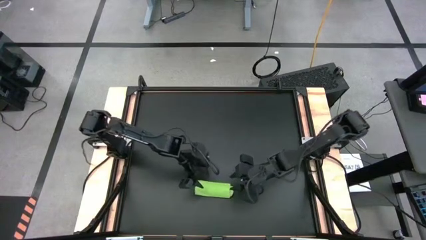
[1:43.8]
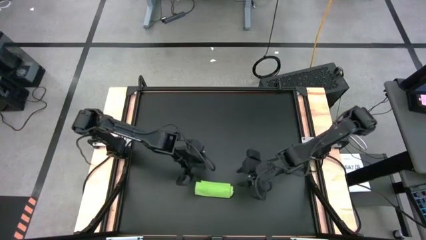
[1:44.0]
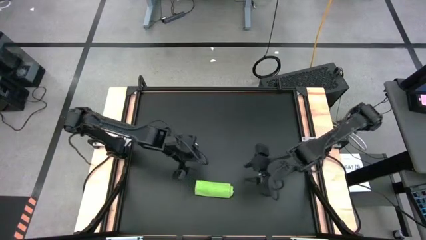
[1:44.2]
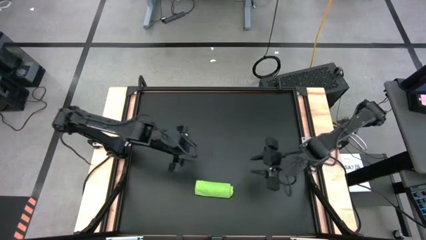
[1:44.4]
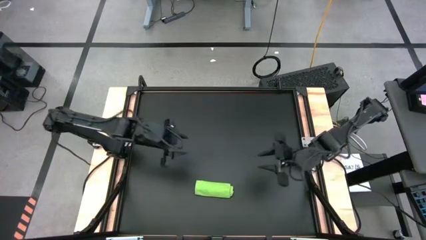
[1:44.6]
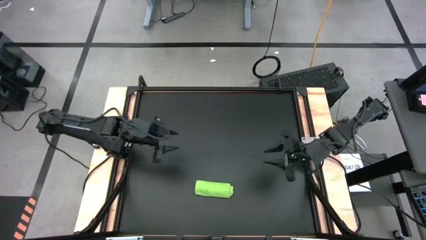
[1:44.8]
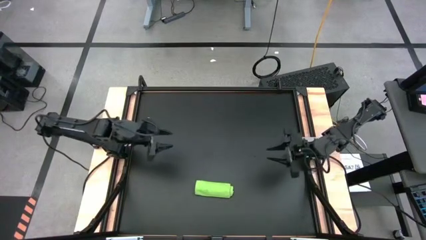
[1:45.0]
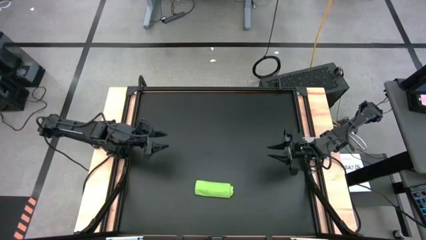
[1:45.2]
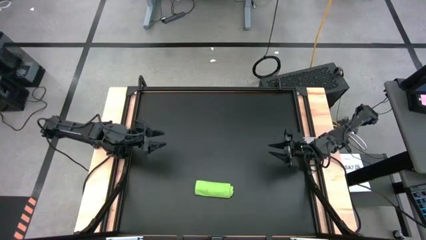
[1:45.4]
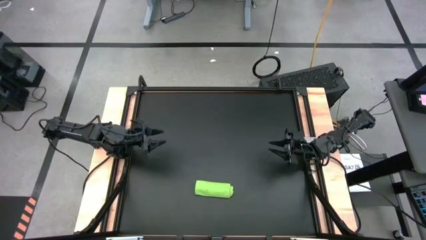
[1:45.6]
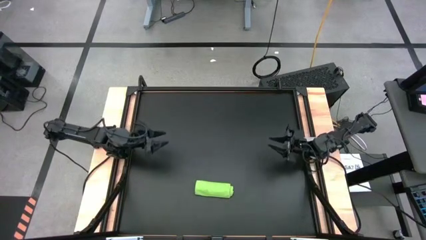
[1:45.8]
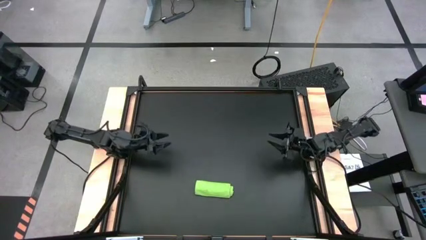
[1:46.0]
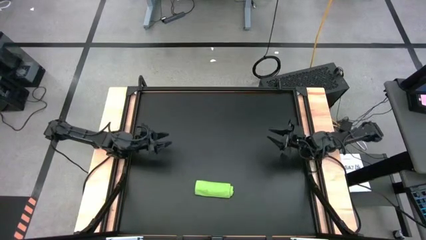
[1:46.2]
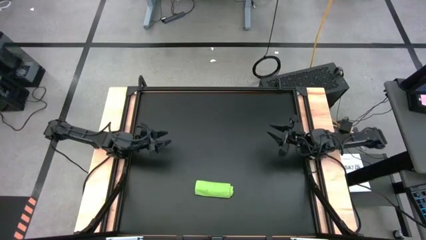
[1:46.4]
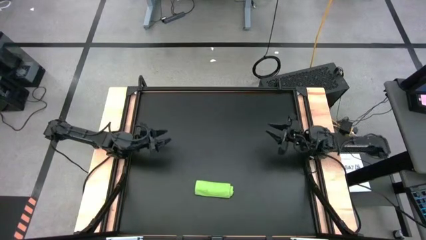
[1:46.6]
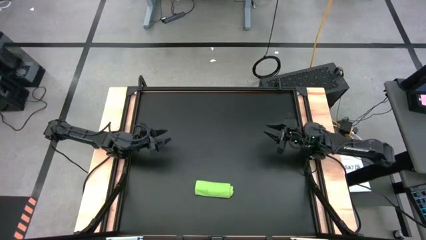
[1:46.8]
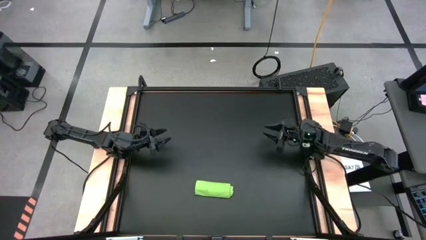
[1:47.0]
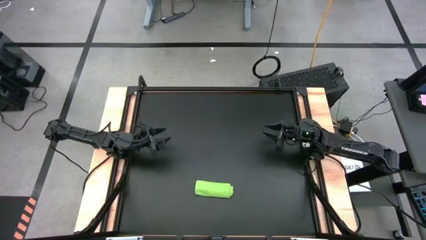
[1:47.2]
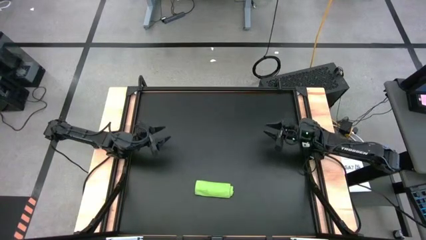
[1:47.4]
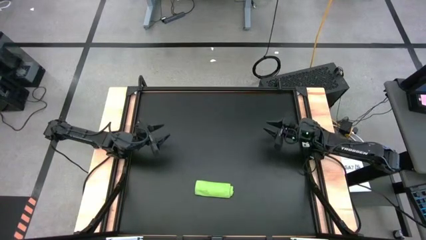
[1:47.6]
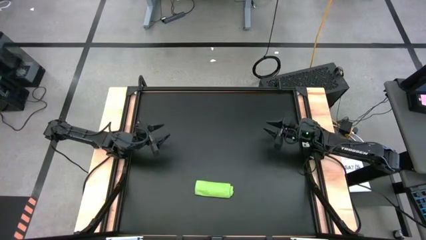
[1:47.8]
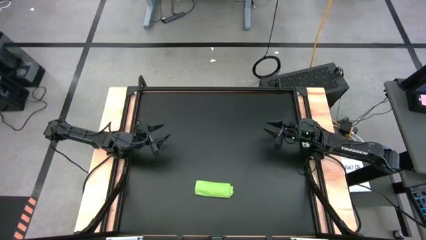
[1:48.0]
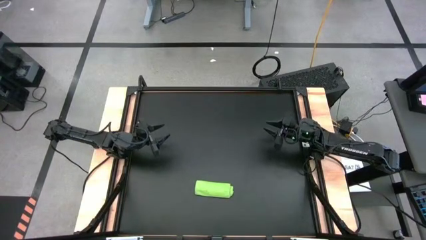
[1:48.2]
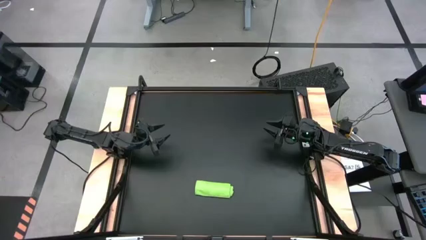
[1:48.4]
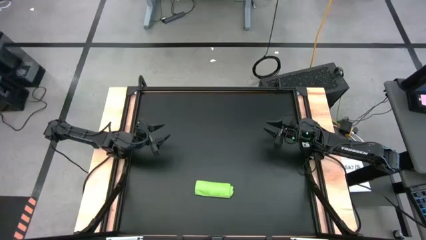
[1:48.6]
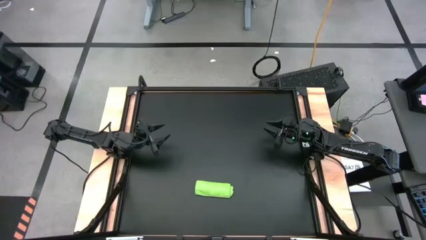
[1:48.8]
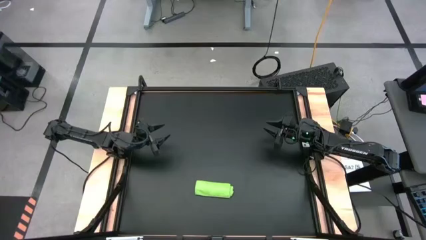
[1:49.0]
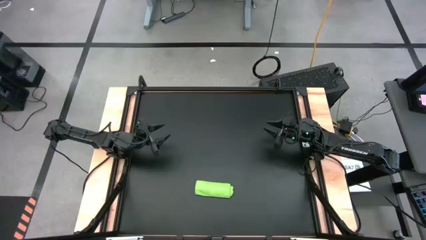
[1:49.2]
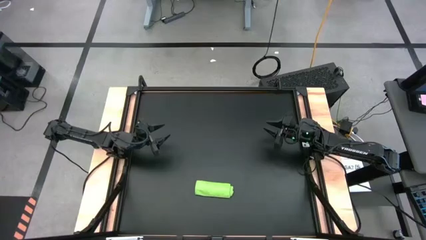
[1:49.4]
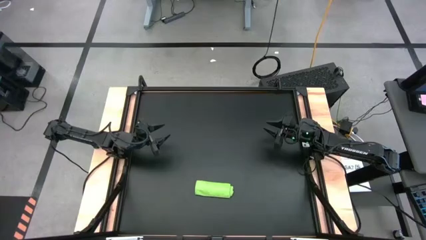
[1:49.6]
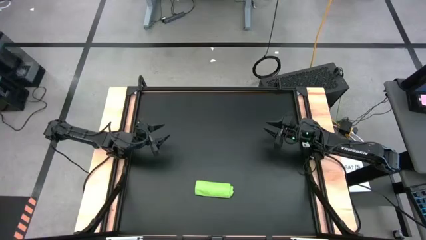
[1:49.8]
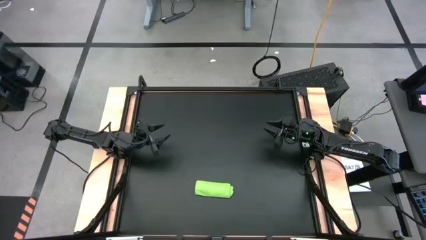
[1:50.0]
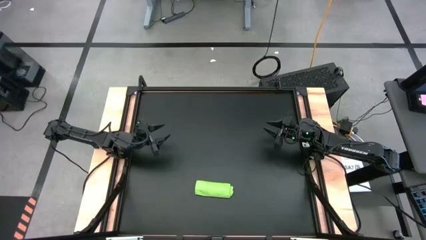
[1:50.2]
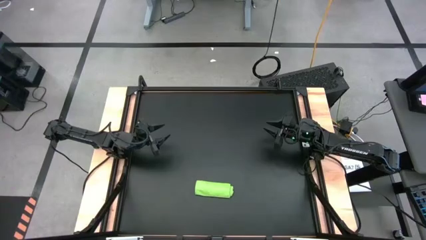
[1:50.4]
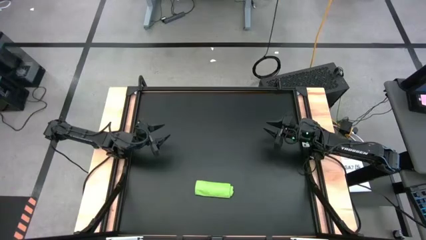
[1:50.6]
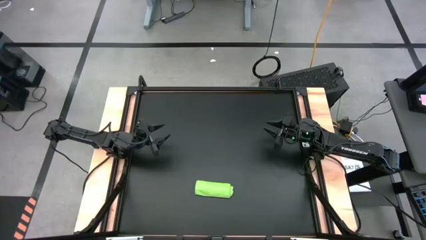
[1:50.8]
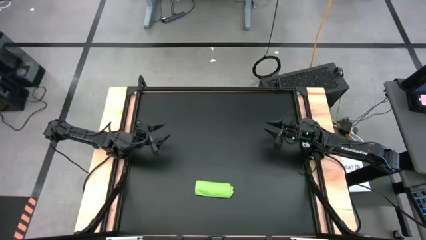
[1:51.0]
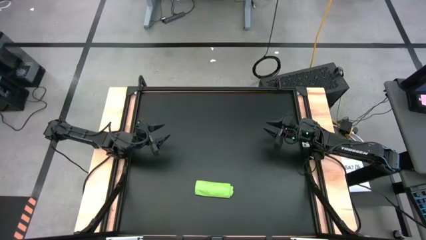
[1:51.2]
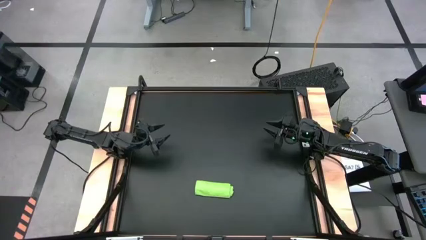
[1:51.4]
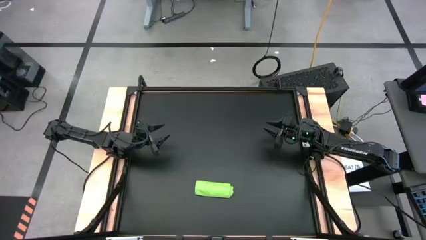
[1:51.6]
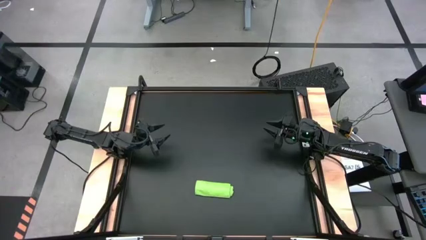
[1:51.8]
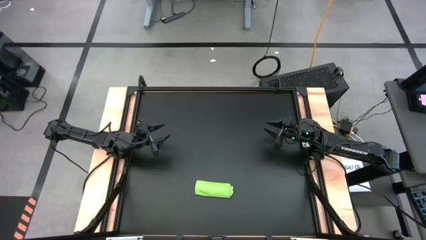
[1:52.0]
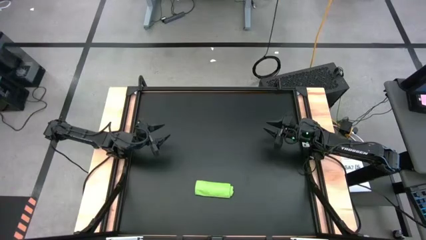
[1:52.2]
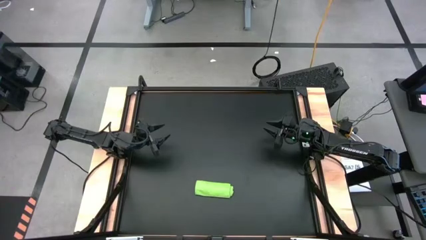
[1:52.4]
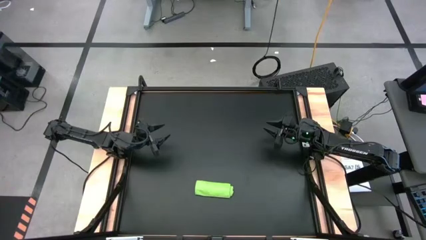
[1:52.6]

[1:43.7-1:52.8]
Task: Roll towel into tight, uniform cylinder
Return to Home Position

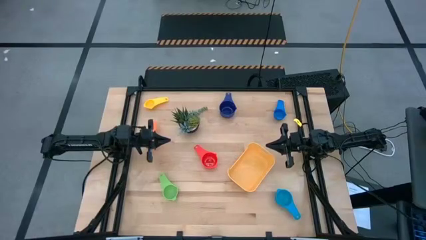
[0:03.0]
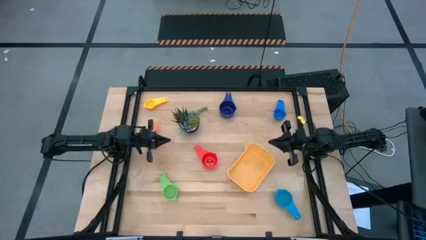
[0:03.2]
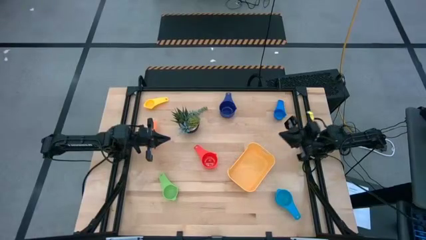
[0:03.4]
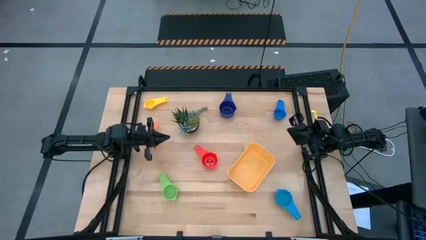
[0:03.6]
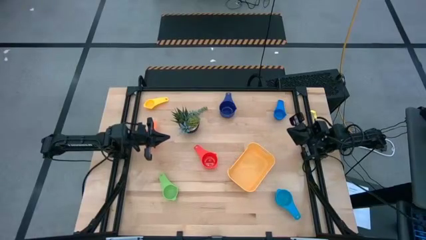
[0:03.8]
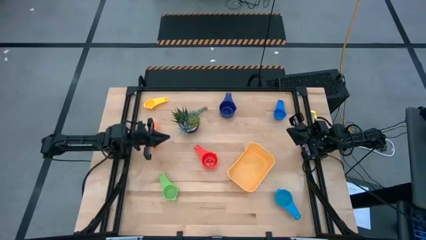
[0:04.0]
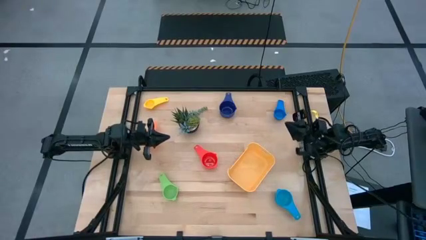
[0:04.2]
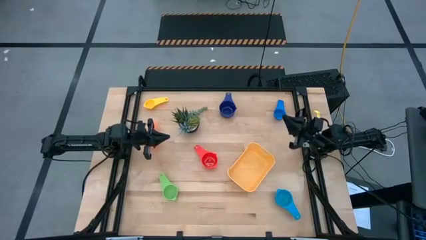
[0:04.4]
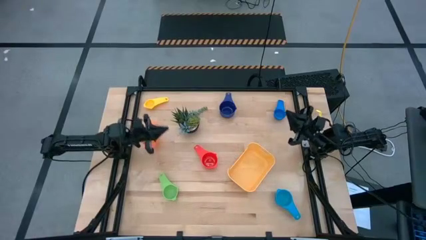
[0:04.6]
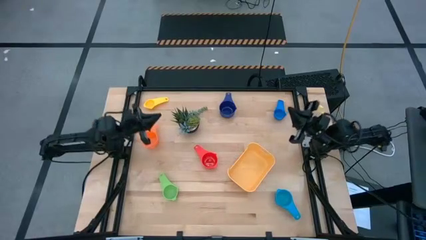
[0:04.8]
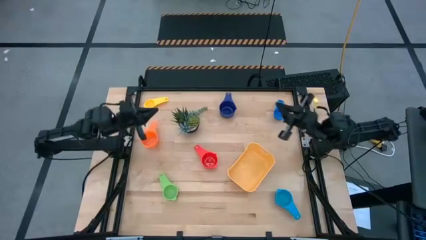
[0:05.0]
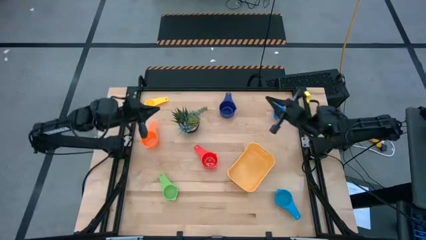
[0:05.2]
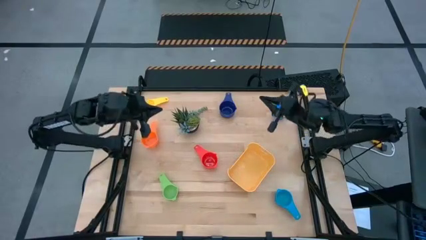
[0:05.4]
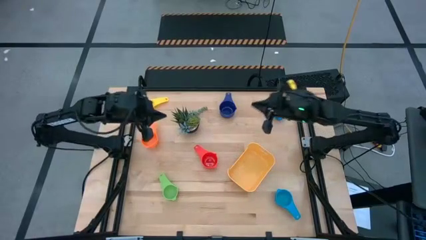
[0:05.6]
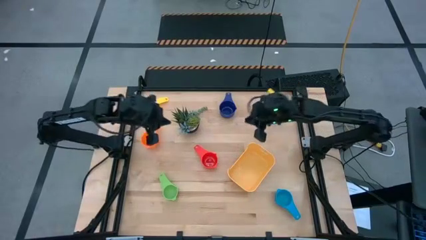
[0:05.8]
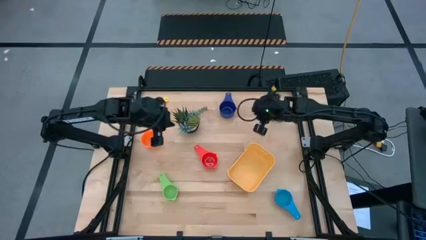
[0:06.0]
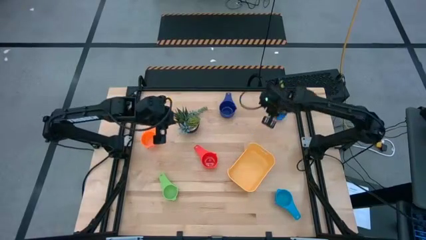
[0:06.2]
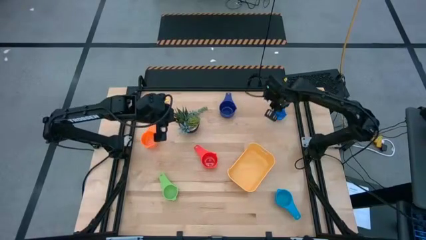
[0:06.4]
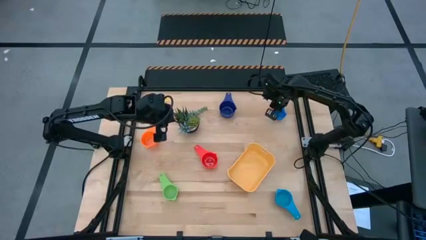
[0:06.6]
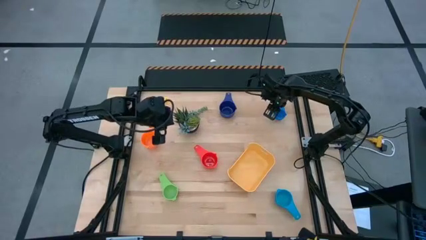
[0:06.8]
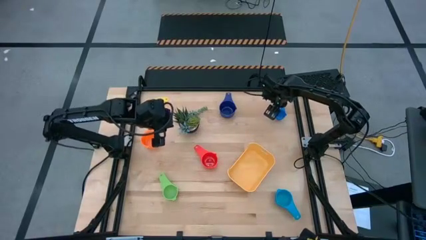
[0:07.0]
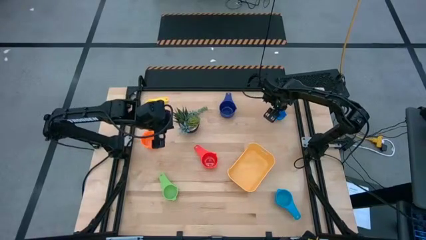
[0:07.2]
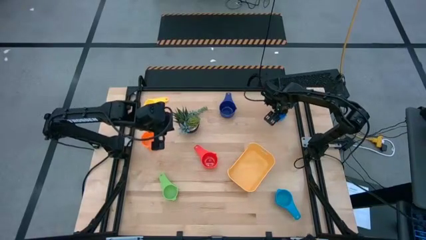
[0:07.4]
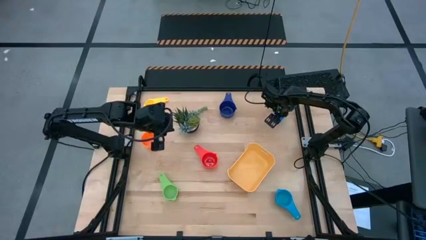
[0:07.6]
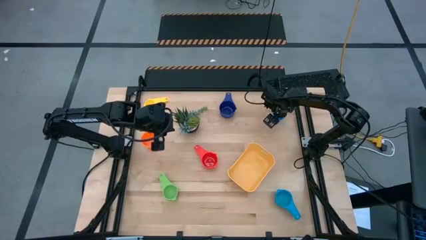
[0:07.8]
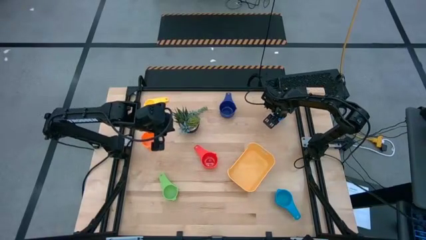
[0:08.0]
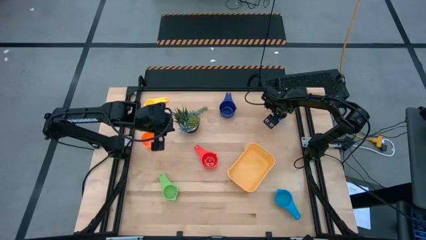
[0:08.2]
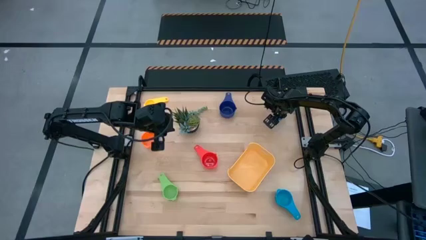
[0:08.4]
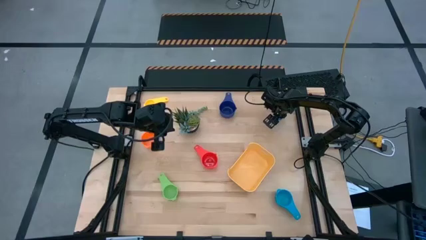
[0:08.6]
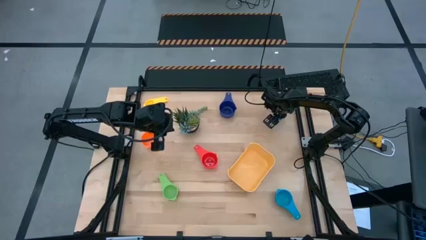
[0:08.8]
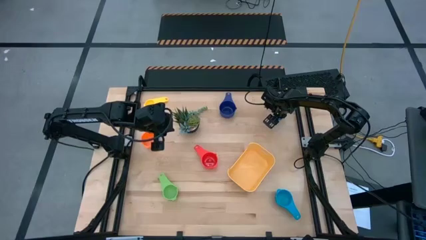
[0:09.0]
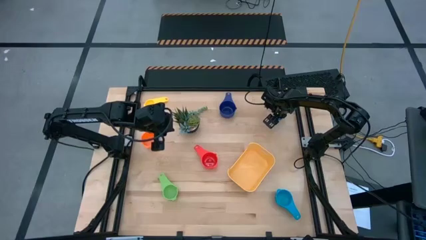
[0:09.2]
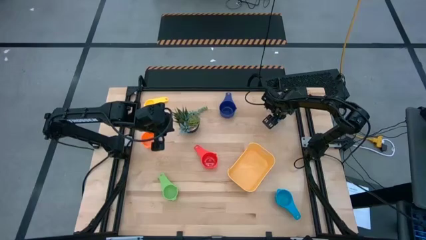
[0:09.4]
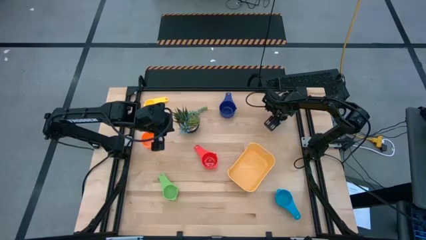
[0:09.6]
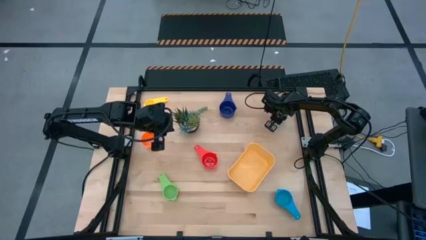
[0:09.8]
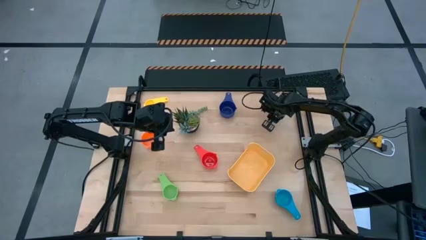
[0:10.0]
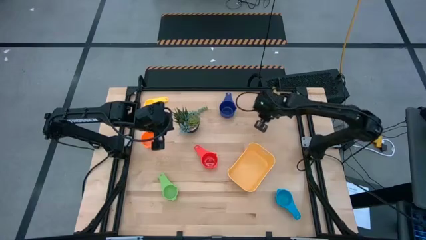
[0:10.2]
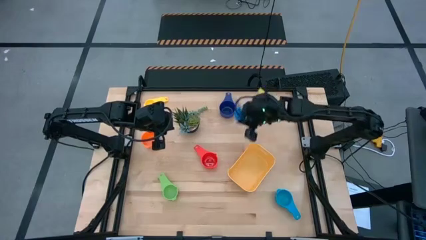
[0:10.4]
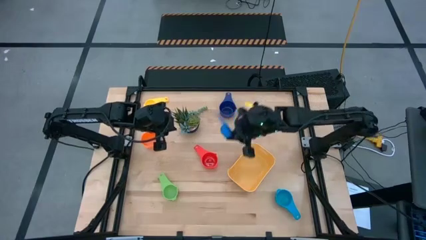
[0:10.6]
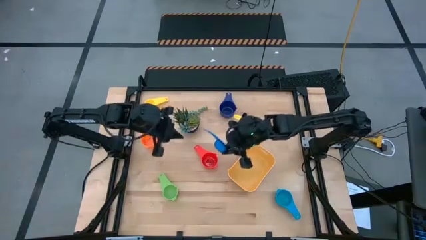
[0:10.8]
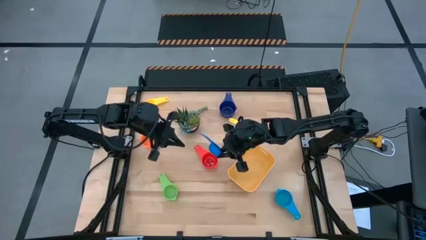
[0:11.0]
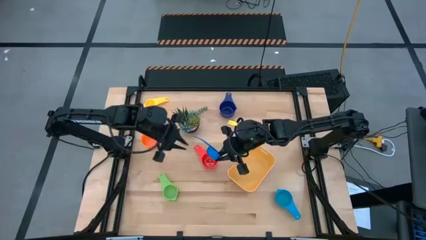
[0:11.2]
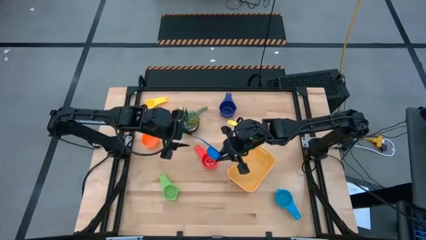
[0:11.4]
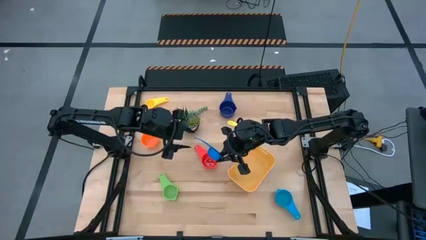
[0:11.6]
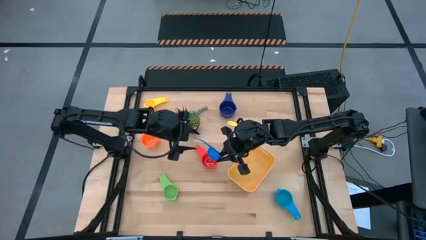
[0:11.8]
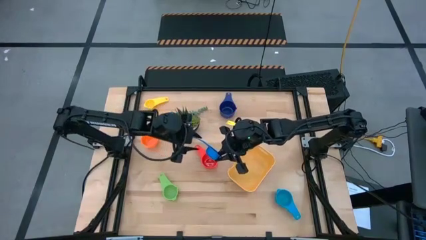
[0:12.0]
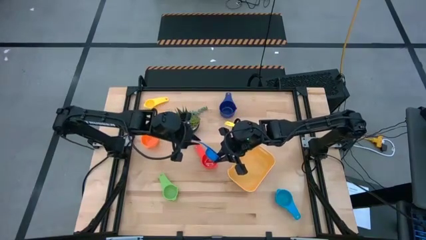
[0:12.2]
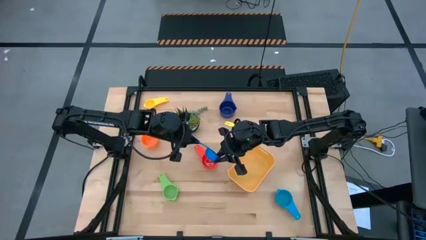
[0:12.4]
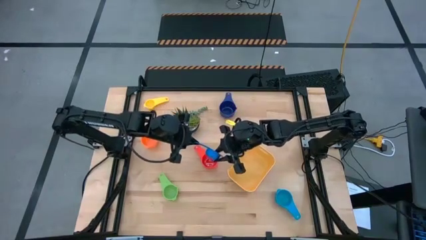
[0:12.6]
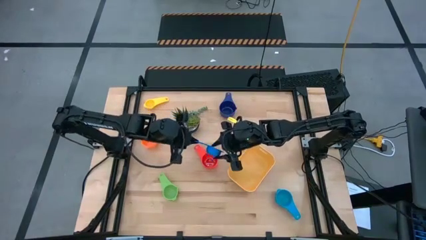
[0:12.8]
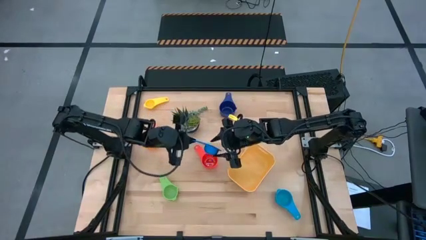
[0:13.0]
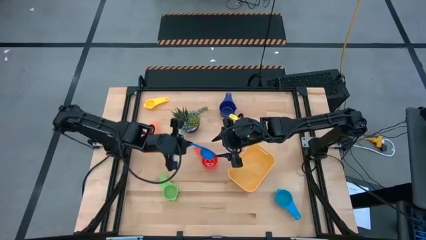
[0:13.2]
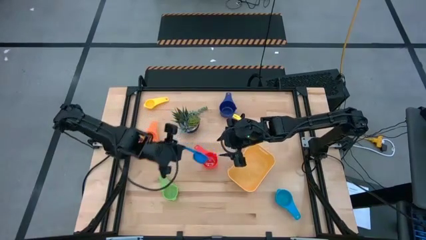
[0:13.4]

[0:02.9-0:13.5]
Task: Nest measuring cups in basket
Stack the blue measuring cup on the green measuring cup
